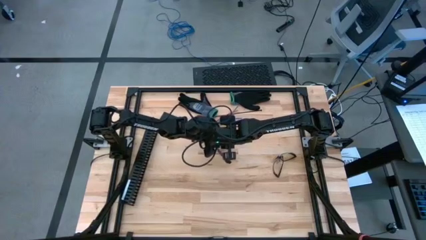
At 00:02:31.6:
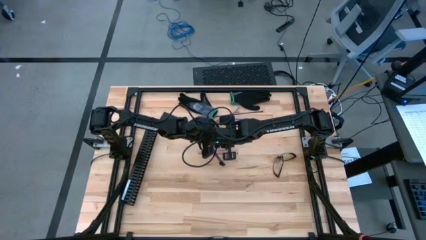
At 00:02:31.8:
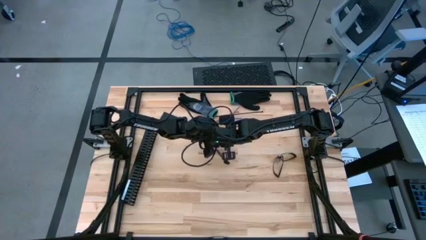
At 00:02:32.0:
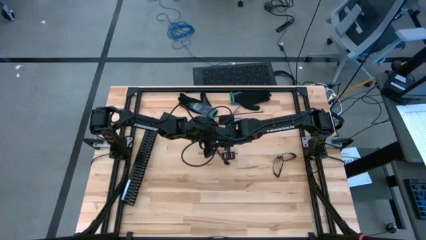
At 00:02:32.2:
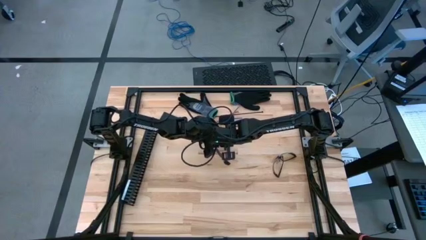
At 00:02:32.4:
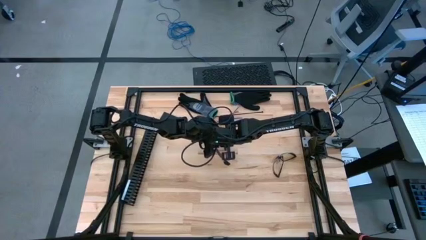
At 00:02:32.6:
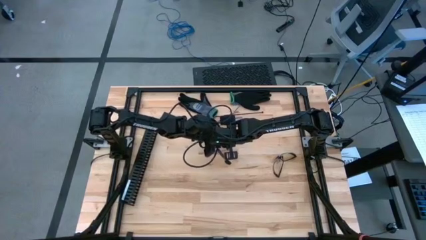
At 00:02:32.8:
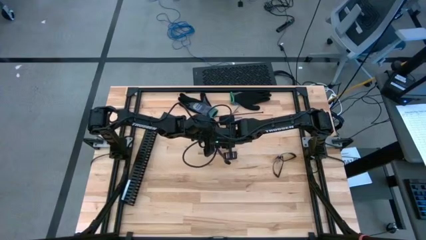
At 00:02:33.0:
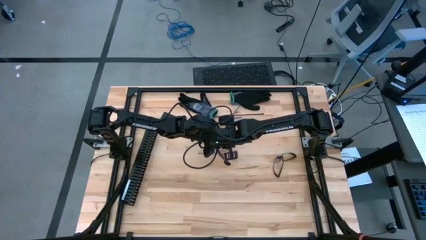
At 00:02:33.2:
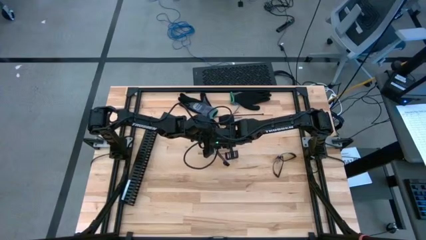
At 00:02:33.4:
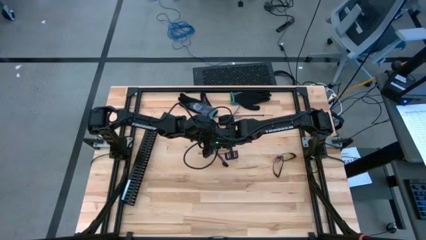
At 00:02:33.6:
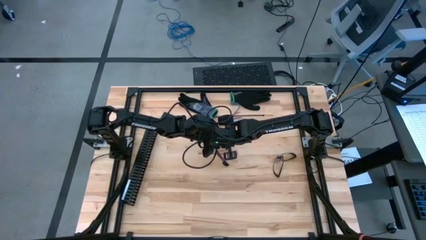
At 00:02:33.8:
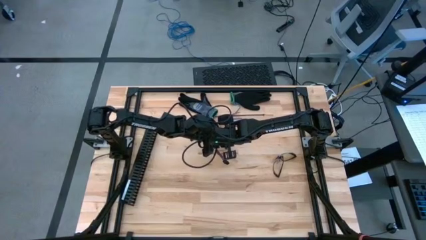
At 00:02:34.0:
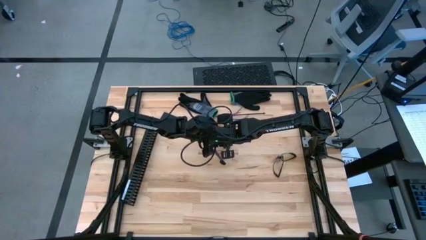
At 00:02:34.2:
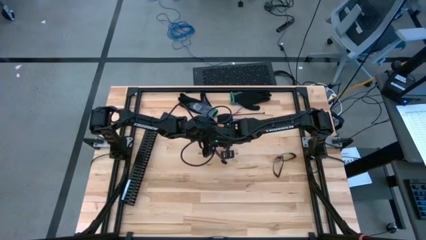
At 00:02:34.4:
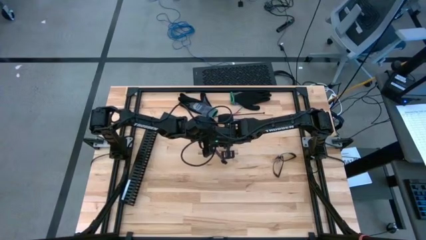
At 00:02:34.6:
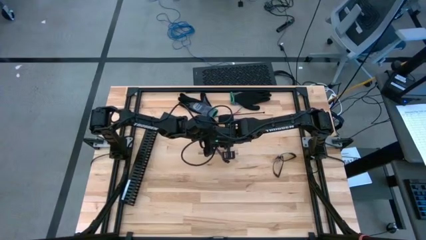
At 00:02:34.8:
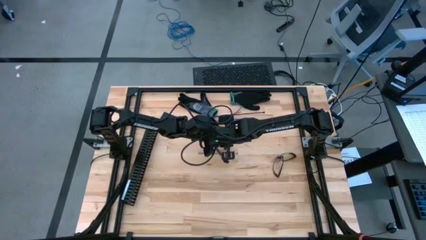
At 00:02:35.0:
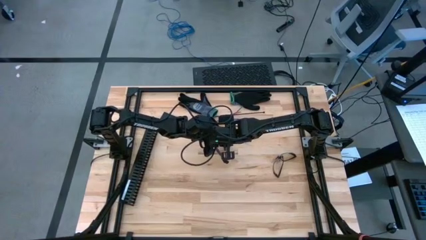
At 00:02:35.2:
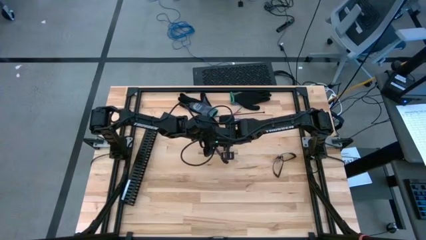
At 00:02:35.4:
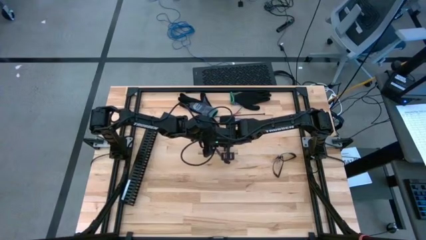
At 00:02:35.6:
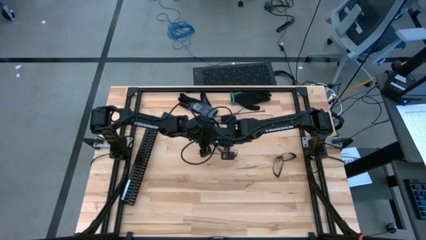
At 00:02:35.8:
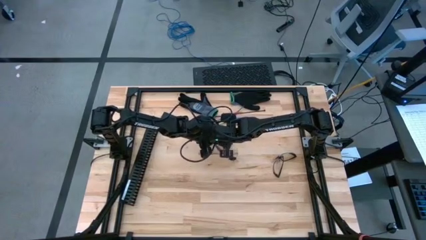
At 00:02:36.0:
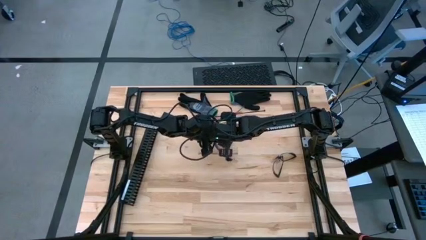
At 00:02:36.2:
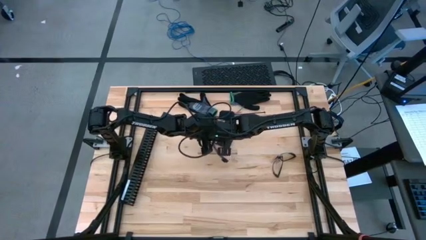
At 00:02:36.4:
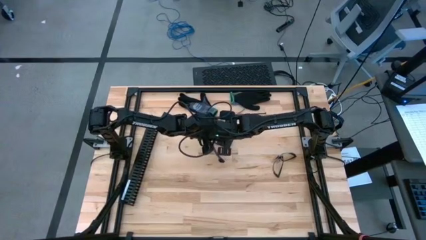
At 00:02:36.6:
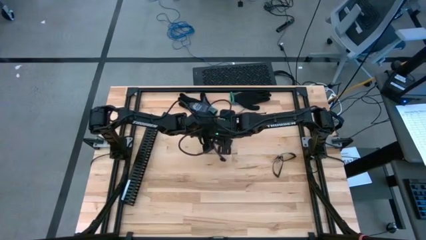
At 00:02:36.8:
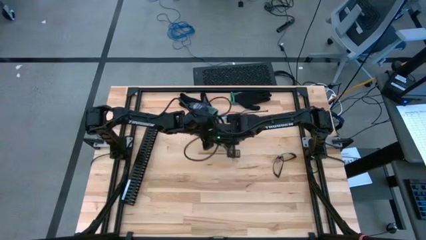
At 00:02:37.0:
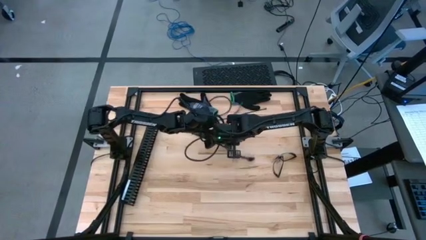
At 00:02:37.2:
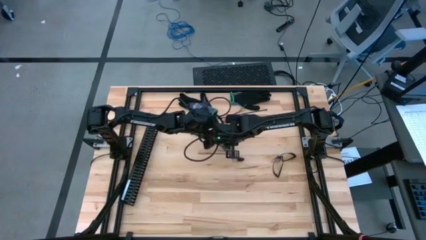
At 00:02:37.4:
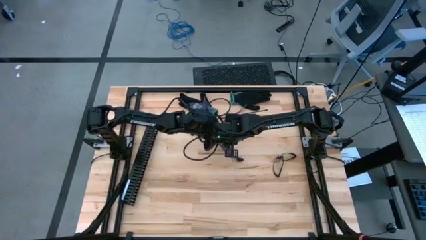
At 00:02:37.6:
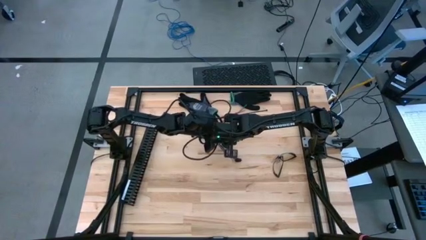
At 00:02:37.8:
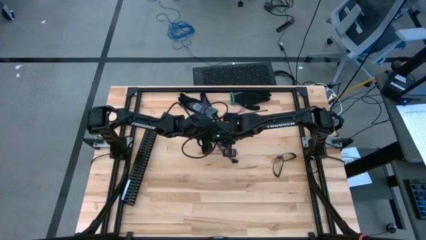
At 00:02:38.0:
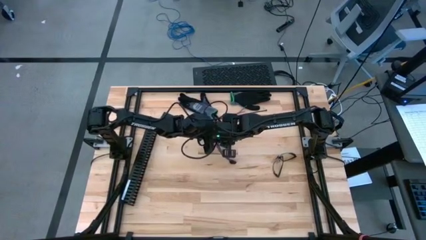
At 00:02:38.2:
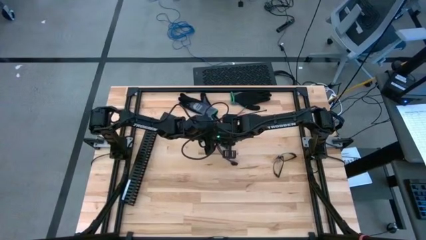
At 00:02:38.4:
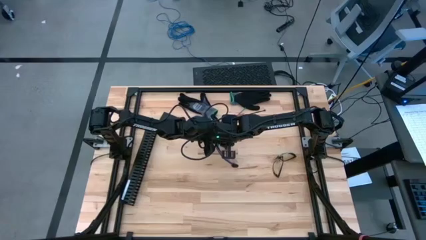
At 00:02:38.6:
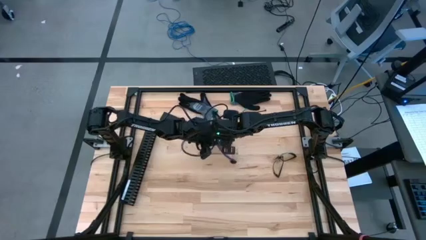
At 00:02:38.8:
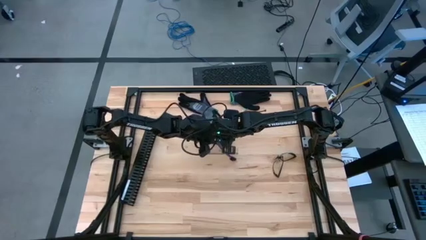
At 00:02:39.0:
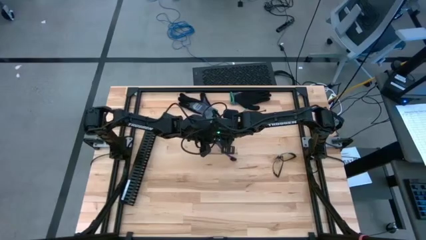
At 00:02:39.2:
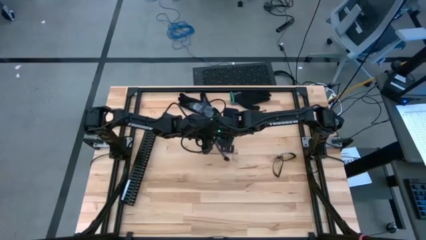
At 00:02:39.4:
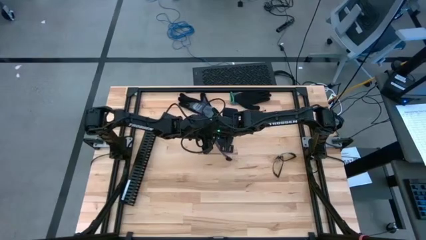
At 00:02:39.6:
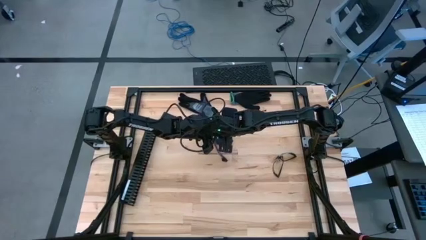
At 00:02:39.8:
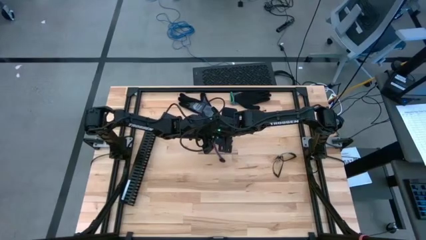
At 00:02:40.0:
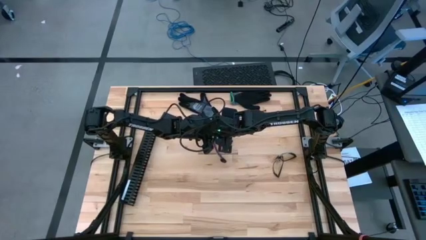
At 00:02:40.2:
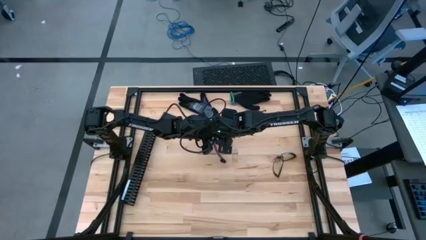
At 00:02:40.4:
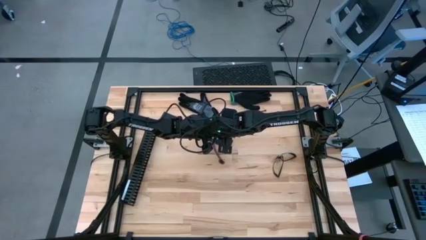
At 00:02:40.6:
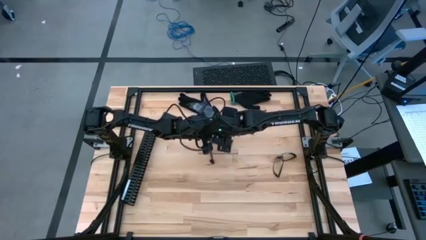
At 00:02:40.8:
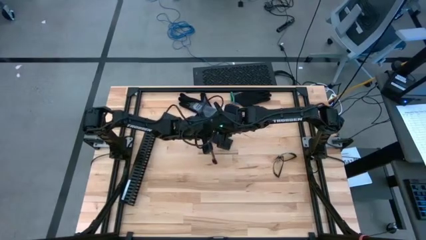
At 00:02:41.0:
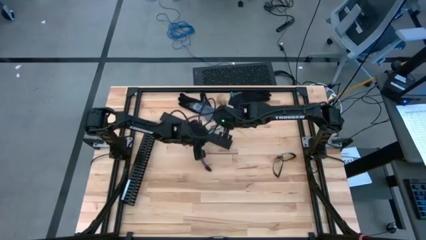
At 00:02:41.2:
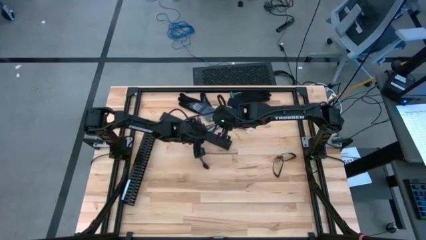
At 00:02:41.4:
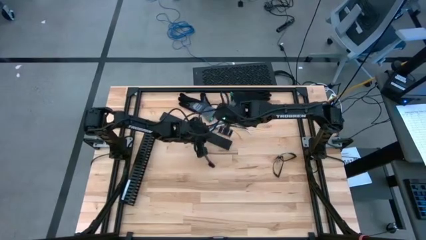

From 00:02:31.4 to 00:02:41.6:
Task: Ziptie cables
Wrap the cables using a black zip tie
